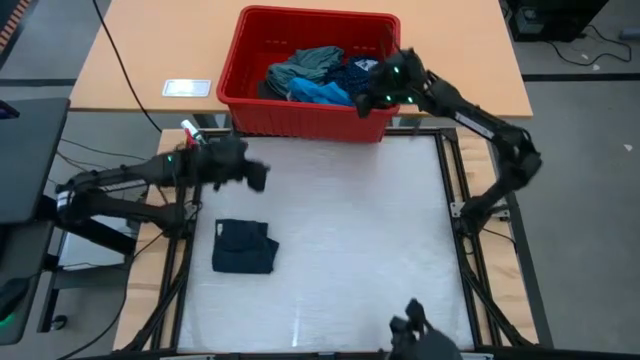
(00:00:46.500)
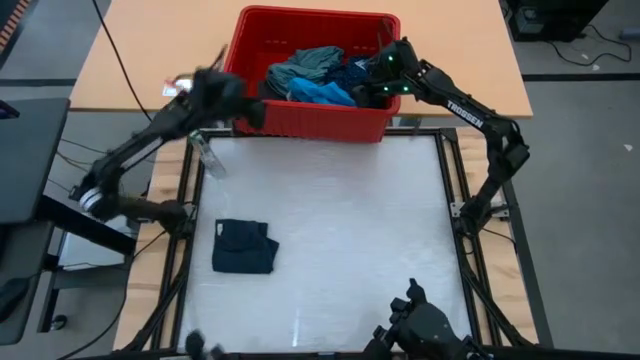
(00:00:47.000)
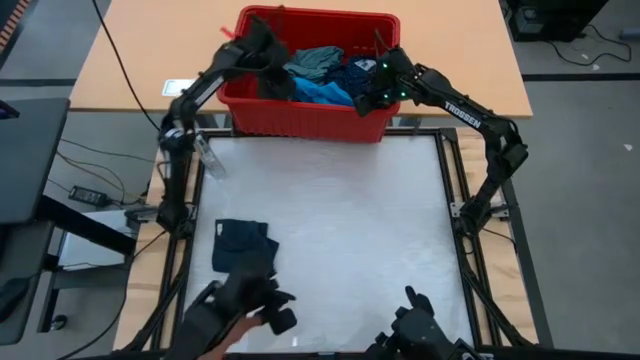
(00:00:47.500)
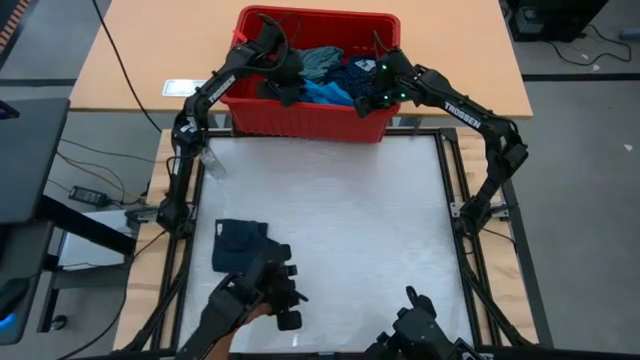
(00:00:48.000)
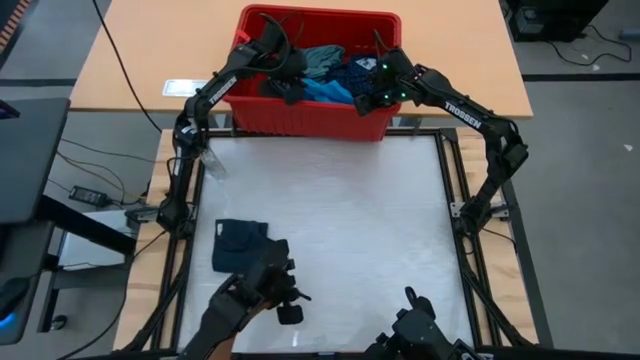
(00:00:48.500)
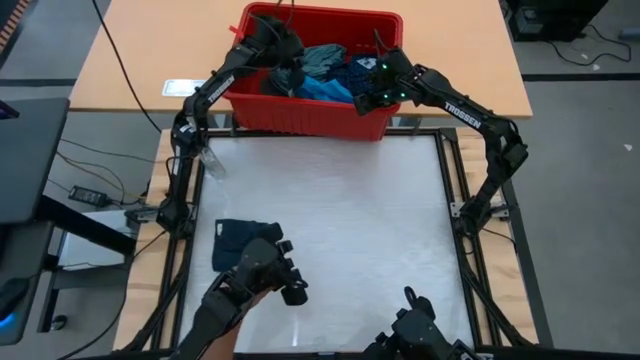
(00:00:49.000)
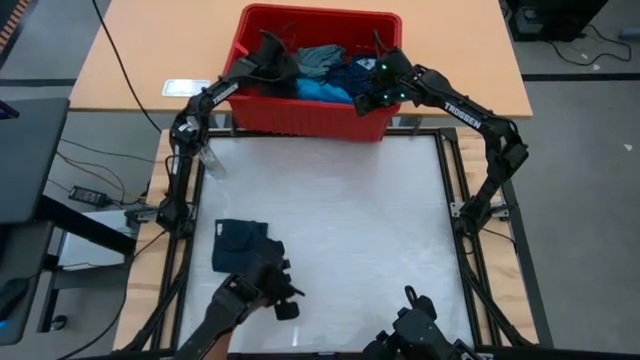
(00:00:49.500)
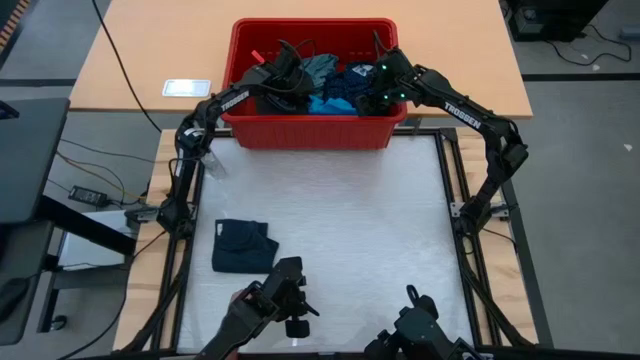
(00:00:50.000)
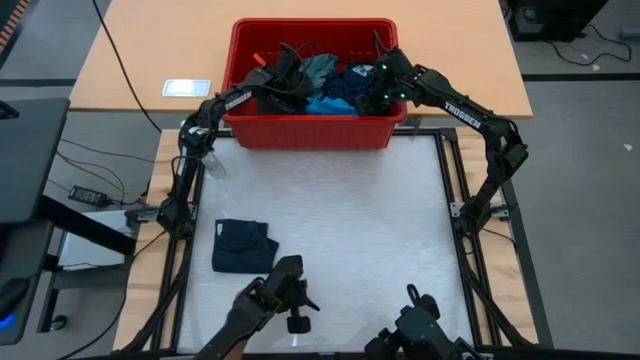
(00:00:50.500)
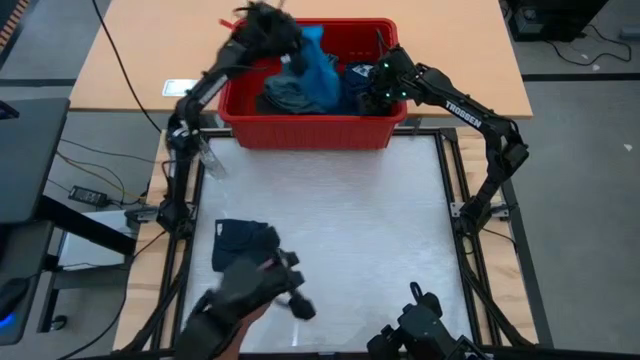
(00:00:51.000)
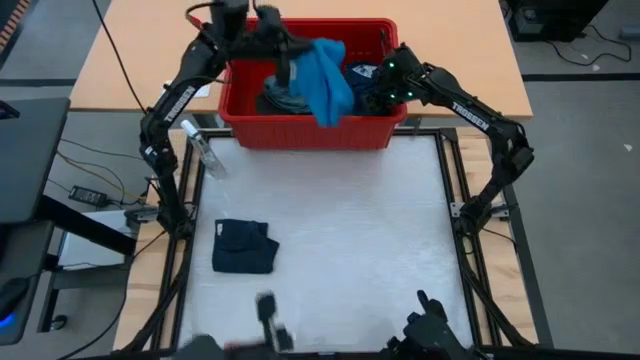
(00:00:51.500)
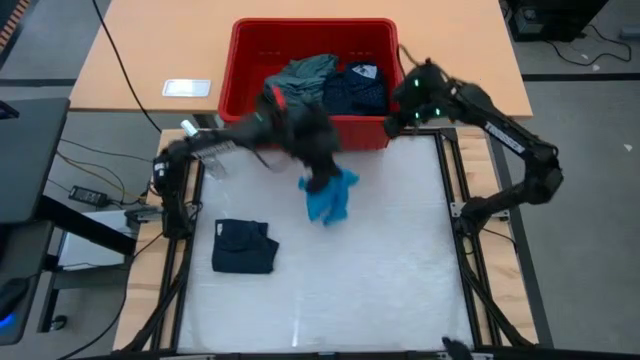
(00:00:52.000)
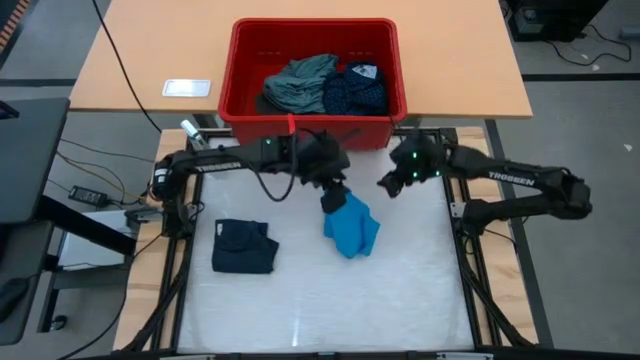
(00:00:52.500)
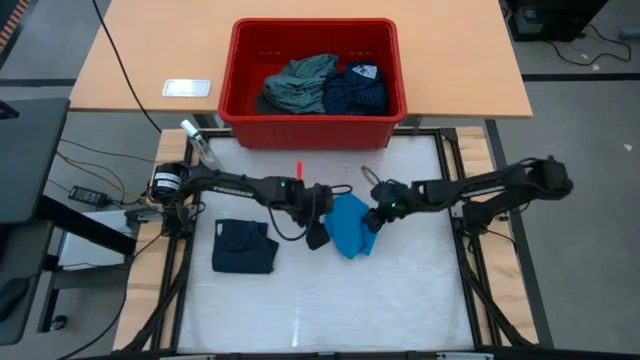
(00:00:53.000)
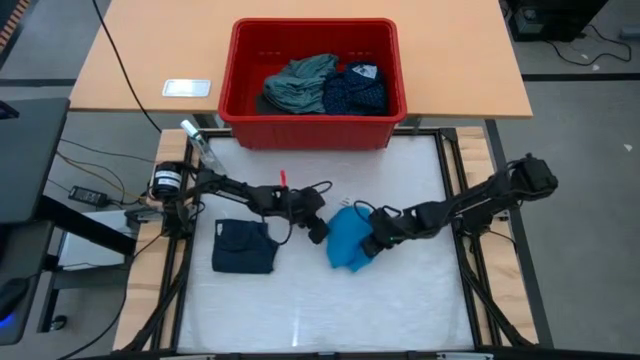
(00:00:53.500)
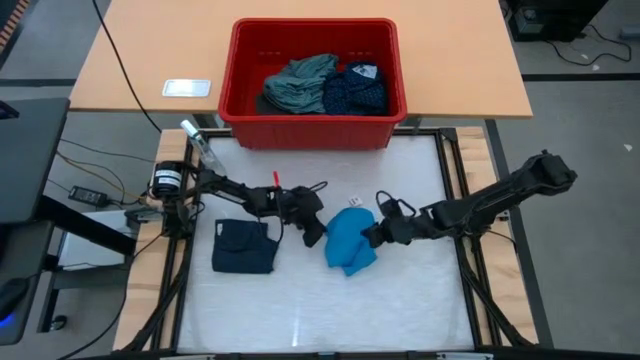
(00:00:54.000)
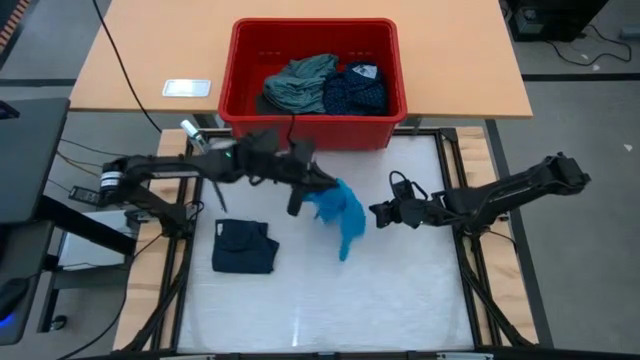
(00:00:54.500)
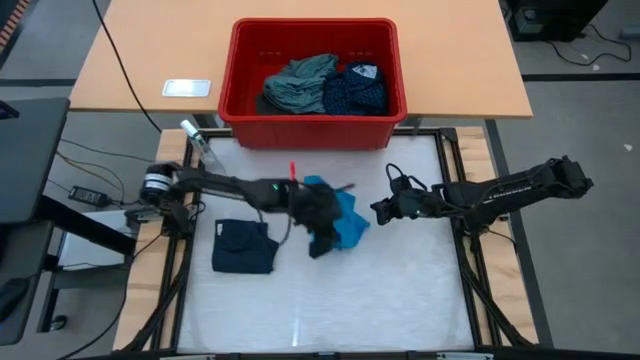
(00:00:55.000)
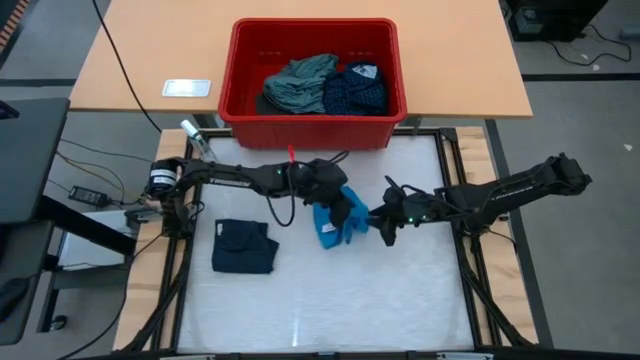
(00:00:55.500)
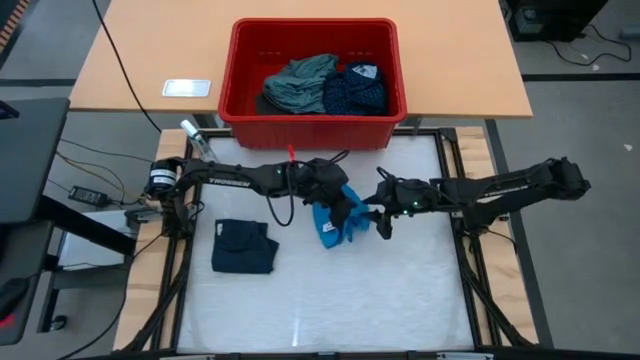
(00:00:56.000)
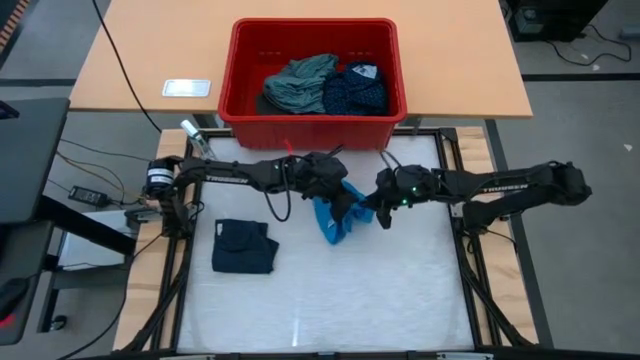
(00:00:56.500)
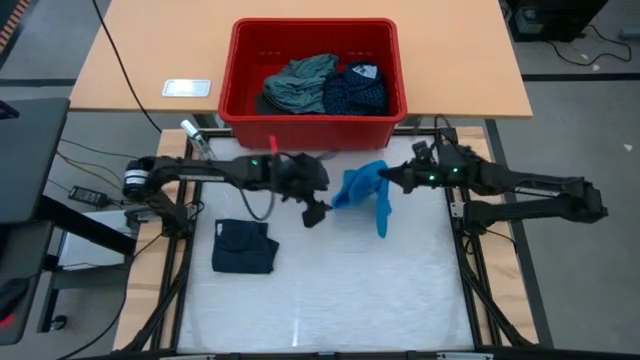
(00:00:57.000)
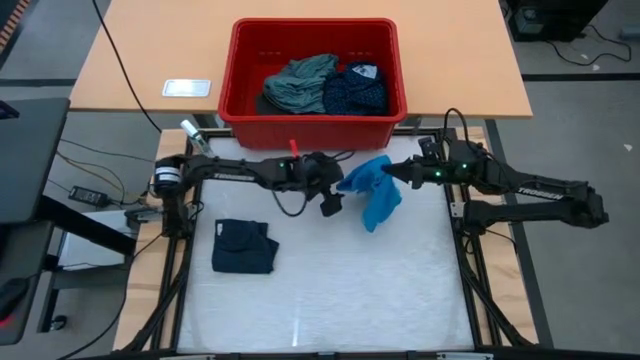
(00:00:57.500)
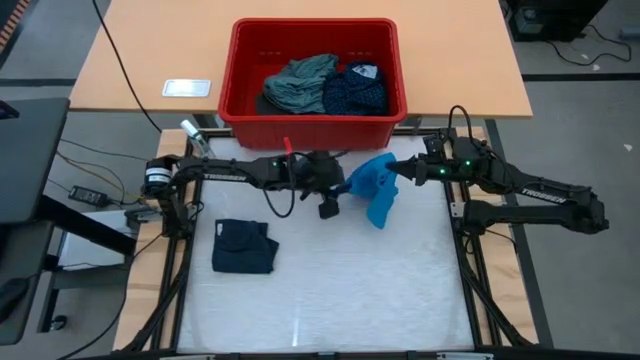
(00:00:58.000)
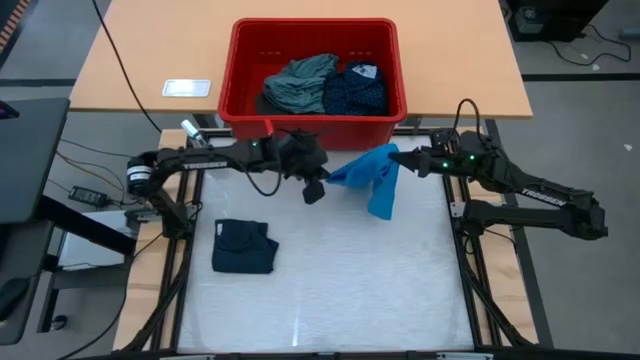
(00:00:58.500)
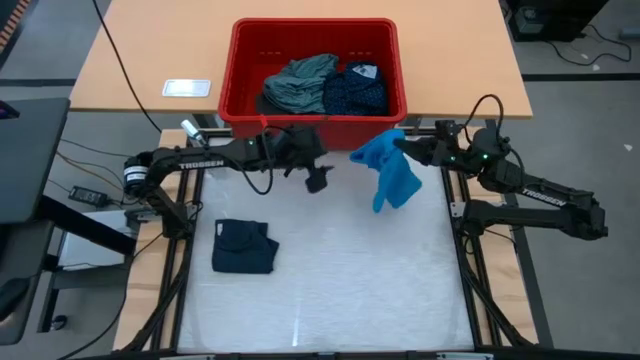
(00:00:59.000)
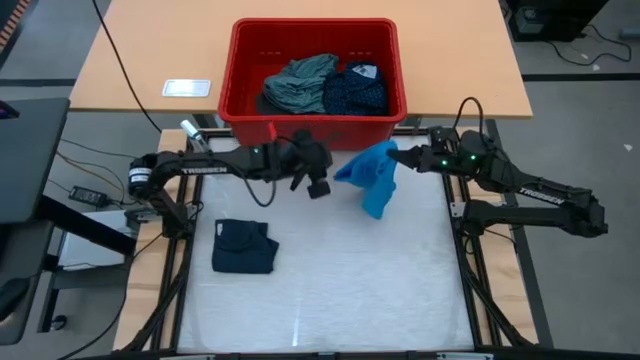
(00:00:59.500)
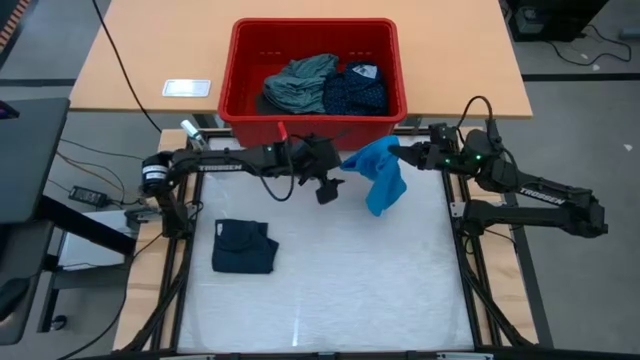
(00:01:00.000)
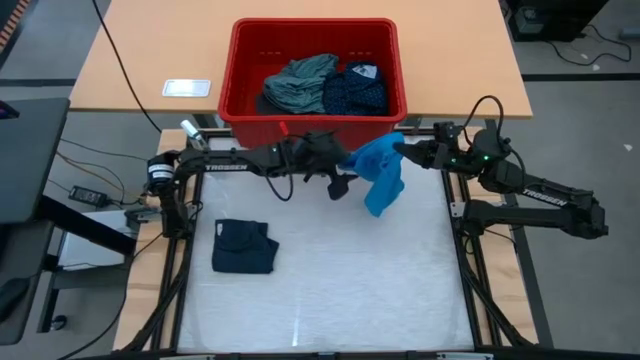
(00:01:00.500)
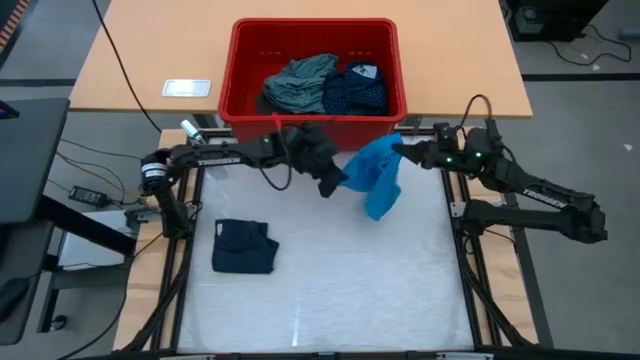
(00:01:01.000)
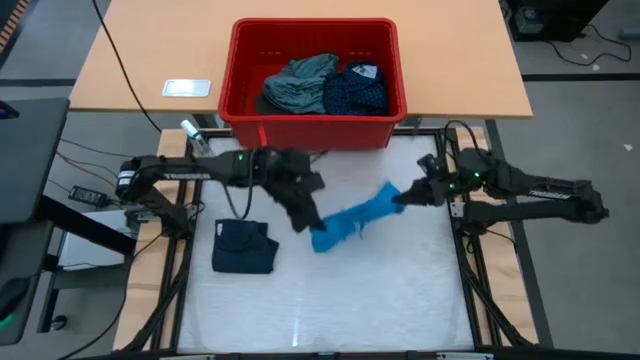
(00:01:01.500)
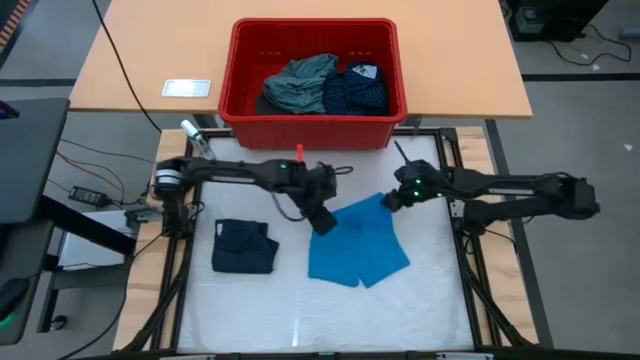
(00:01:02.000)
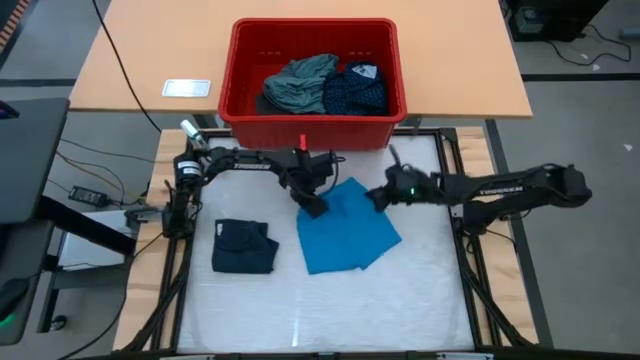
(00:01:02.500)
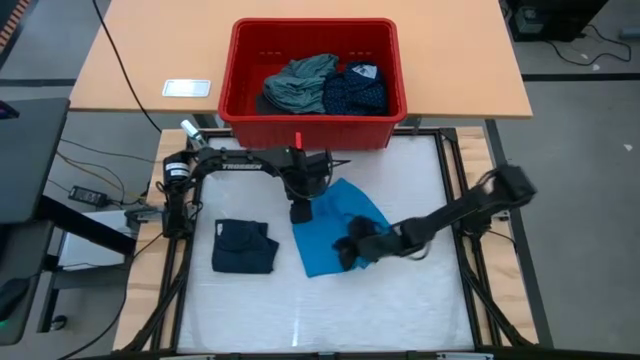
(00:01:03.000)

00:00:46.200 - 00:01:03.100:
Task: Fold laundry
Fold the light blue shorts

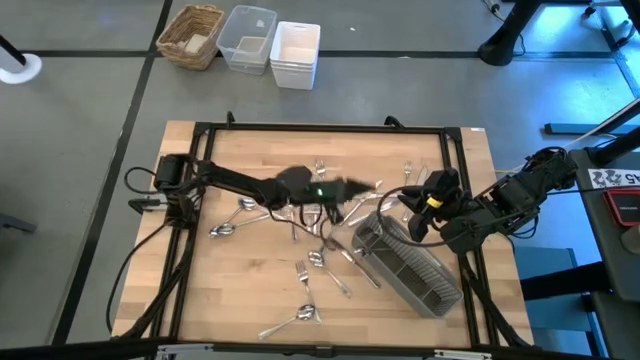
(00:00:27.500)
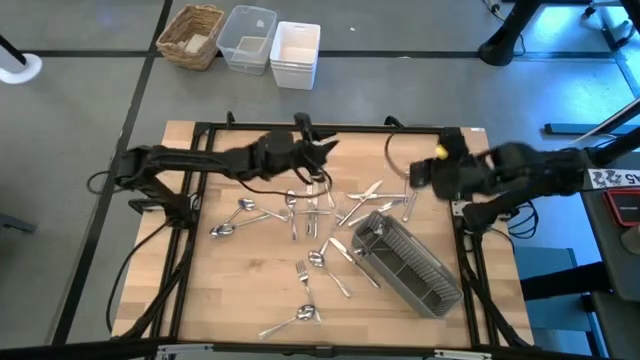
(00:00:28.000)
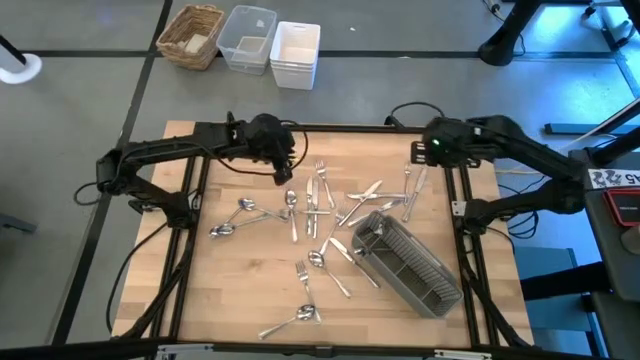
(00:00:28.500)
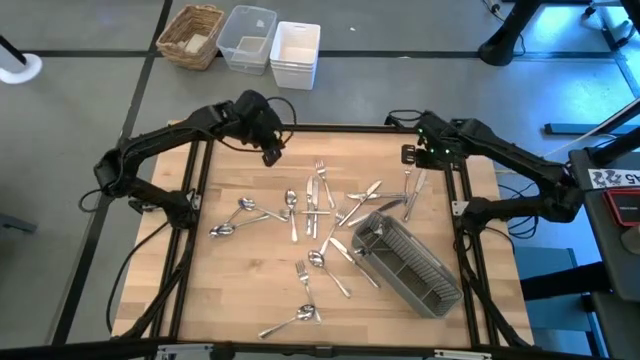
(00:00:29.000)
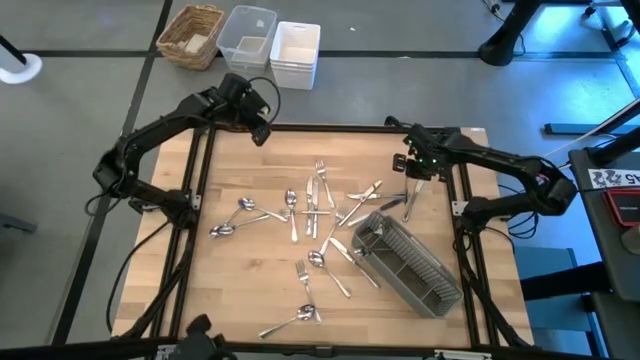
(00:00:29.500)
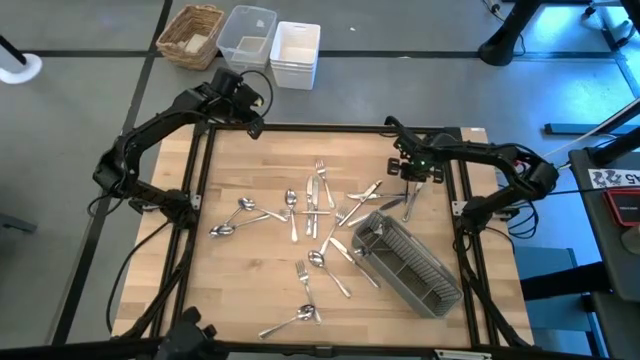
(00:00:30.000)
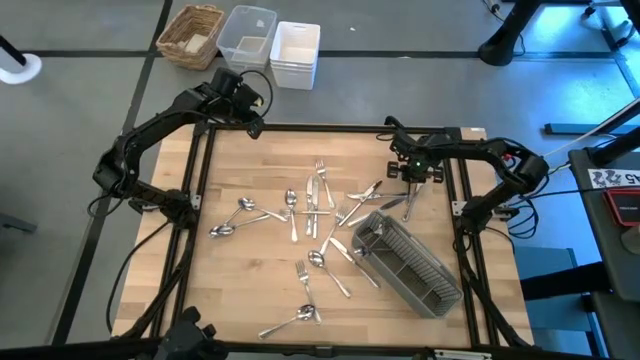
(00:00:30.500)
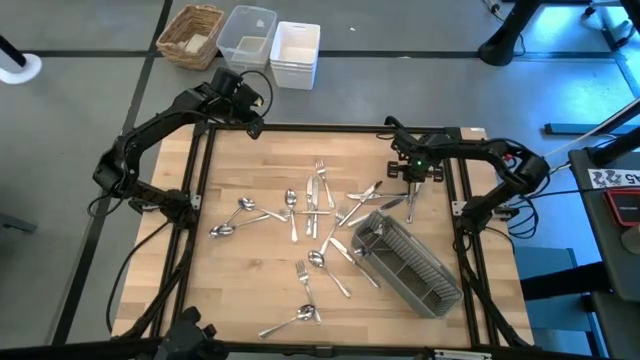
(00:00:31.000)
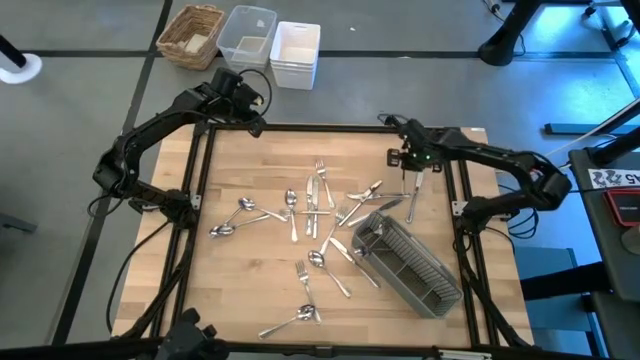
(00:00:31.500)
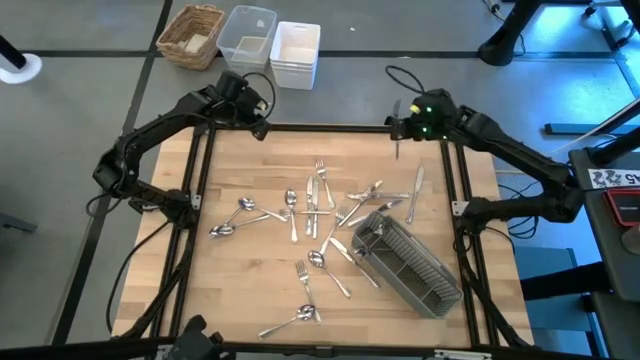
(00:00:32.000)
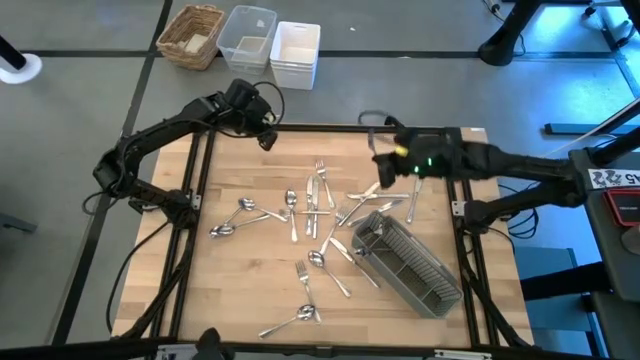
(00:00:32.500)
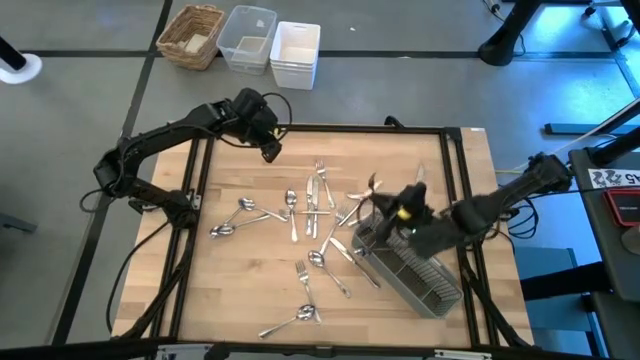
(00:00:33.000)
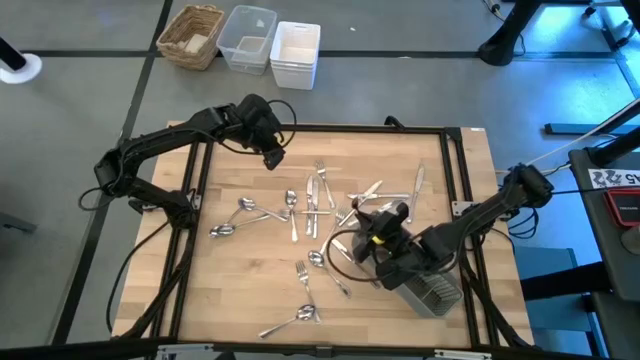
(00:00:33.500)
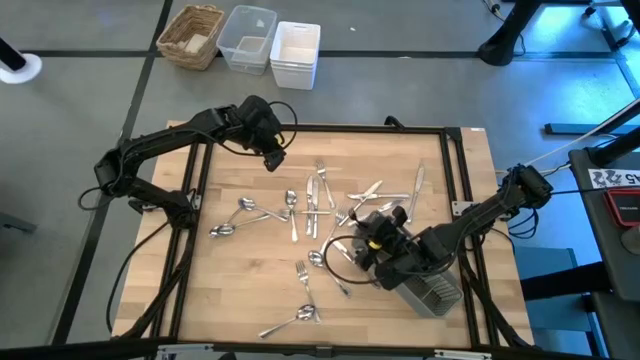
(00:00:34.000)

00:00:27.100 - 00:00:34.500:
Task: Sort silverware
Put the silver fork into the gray silverware basket
